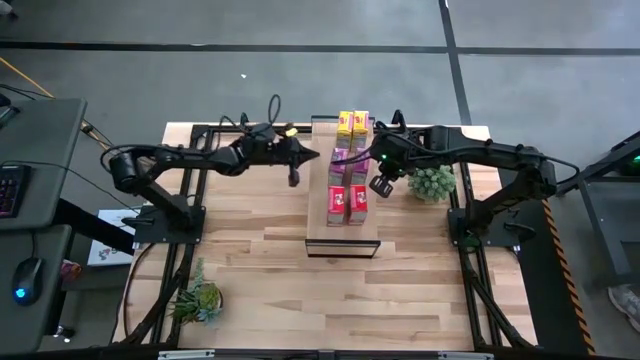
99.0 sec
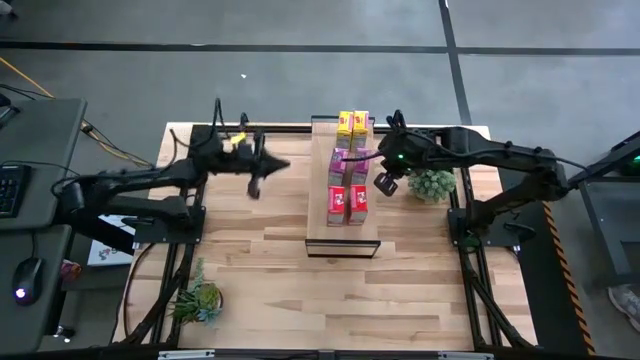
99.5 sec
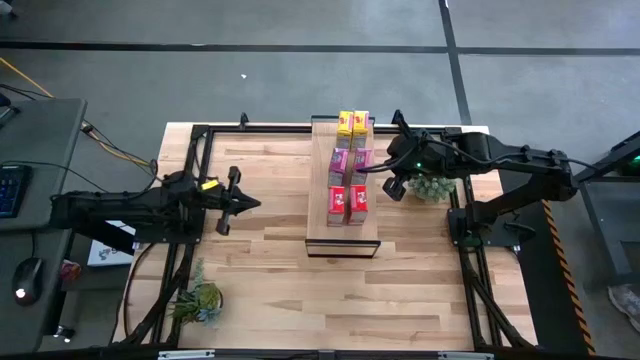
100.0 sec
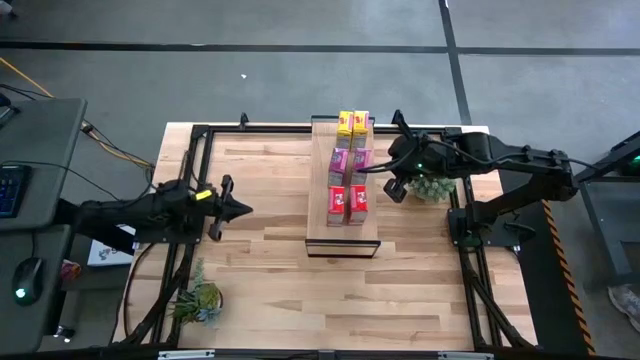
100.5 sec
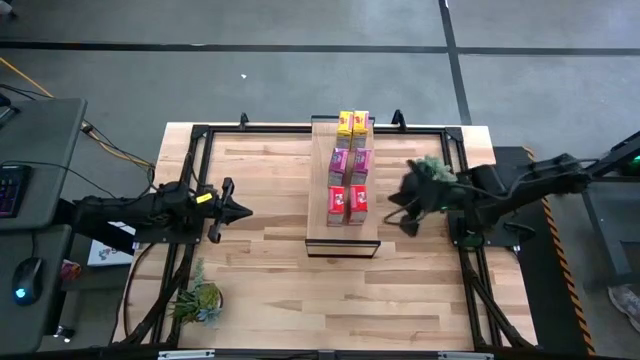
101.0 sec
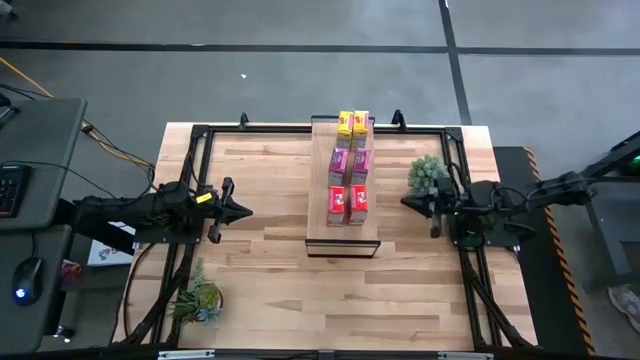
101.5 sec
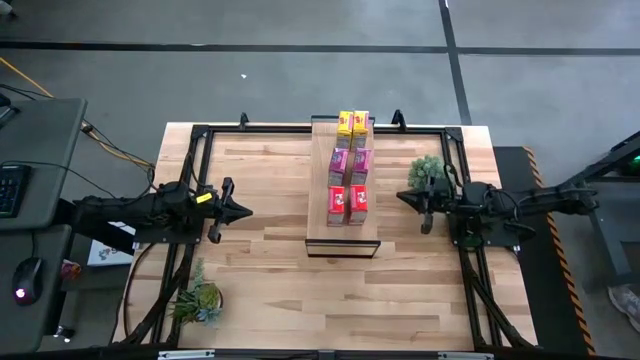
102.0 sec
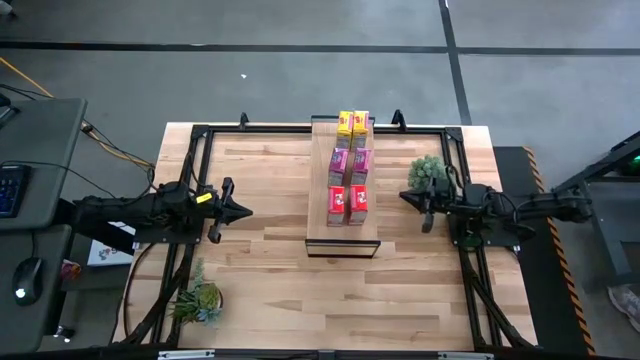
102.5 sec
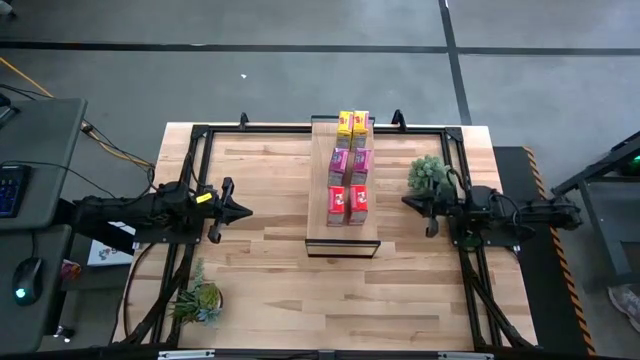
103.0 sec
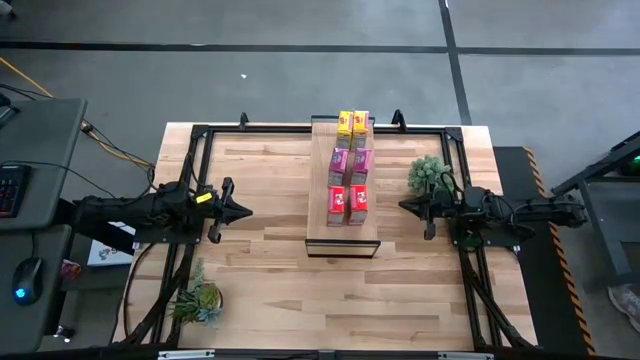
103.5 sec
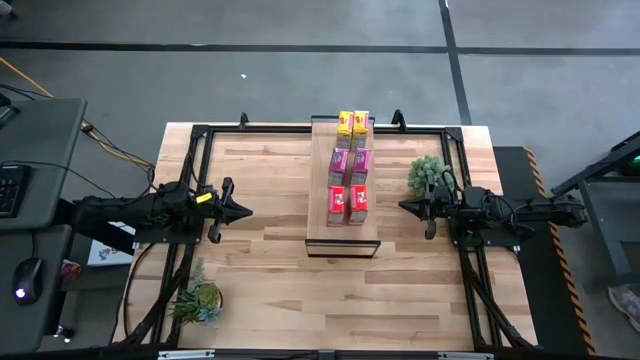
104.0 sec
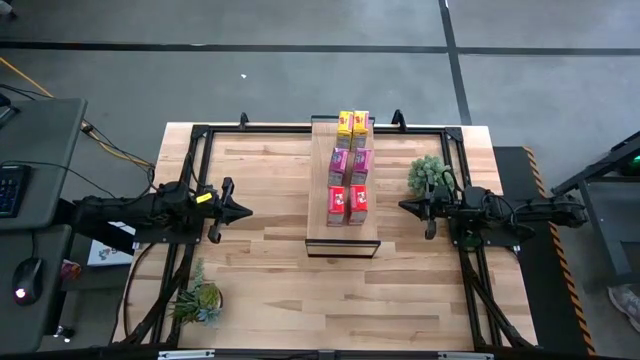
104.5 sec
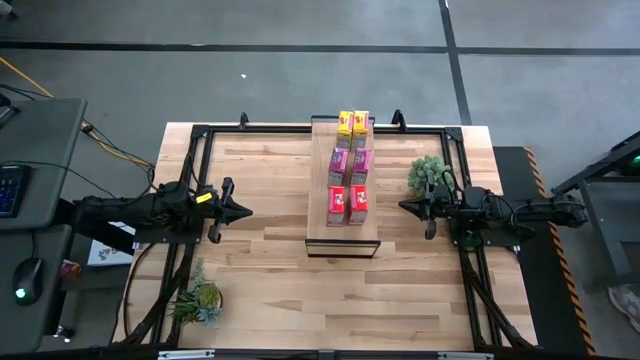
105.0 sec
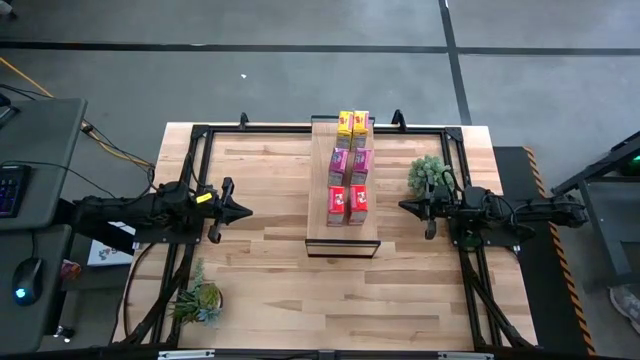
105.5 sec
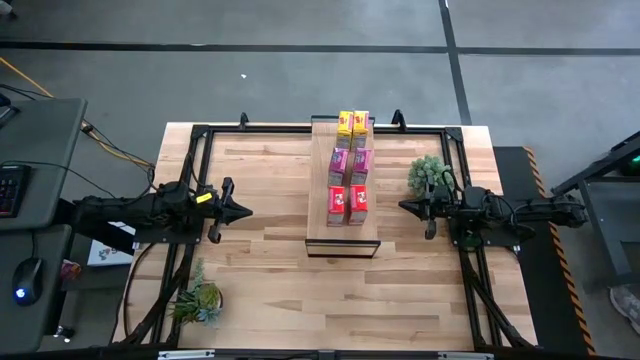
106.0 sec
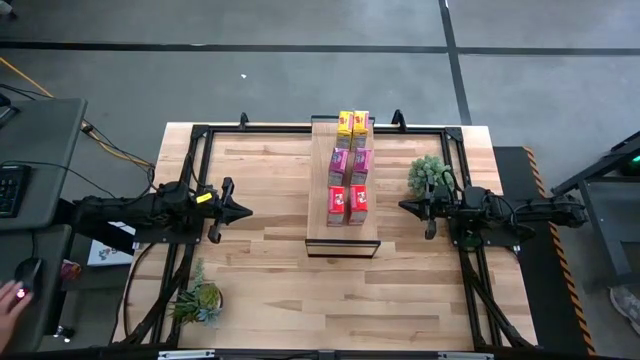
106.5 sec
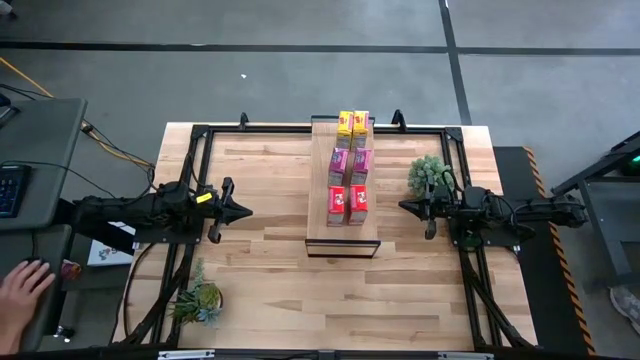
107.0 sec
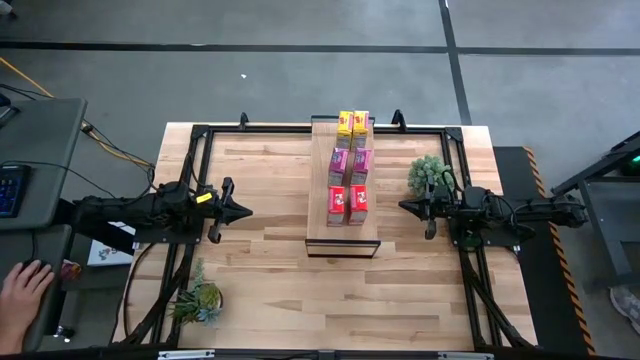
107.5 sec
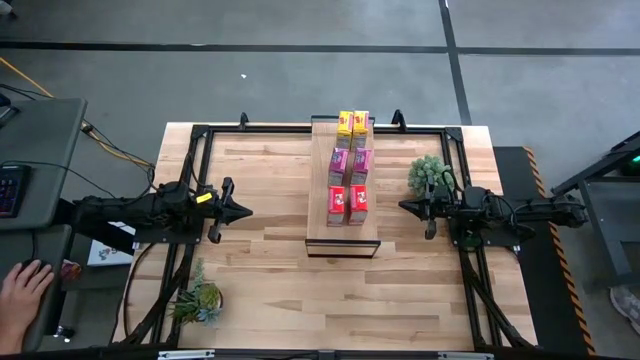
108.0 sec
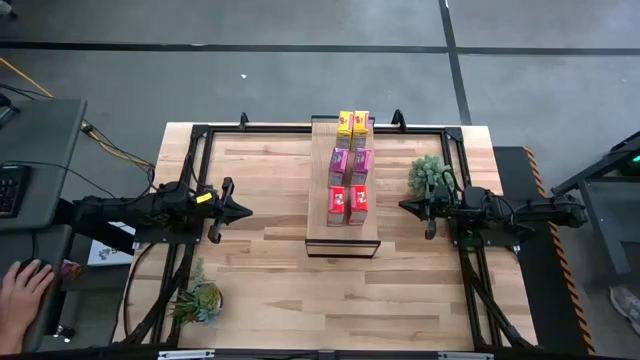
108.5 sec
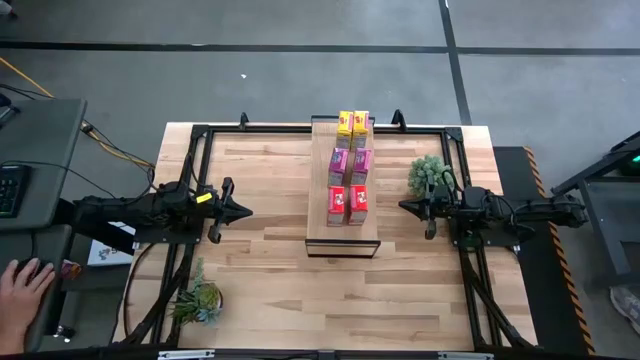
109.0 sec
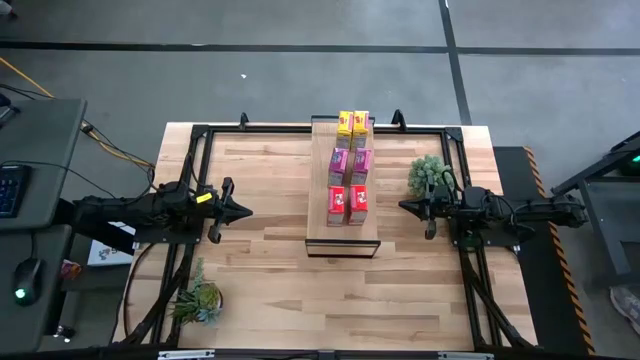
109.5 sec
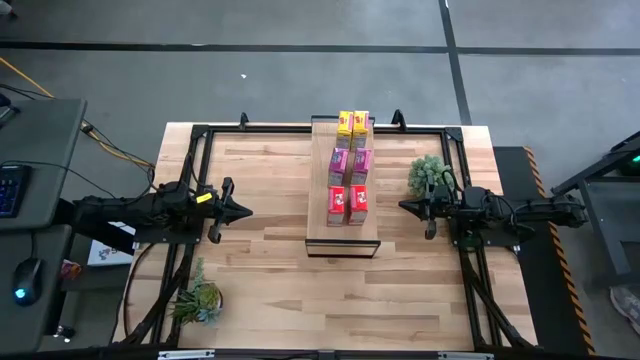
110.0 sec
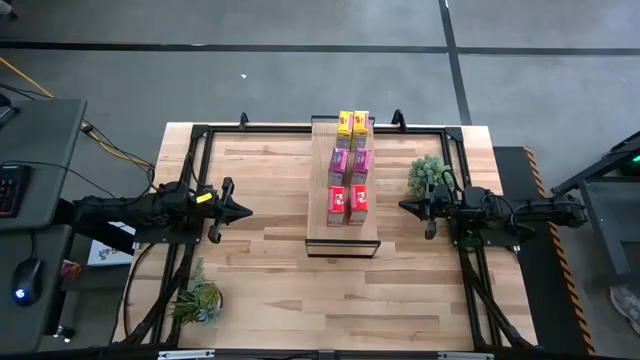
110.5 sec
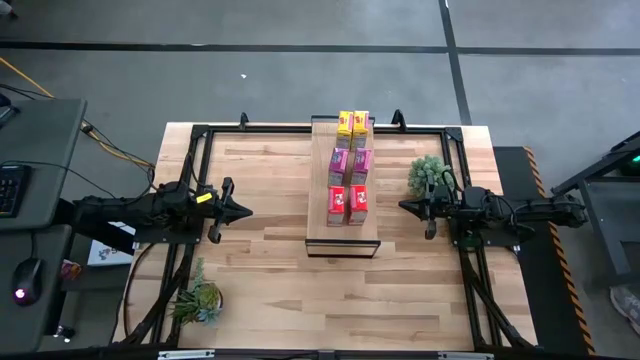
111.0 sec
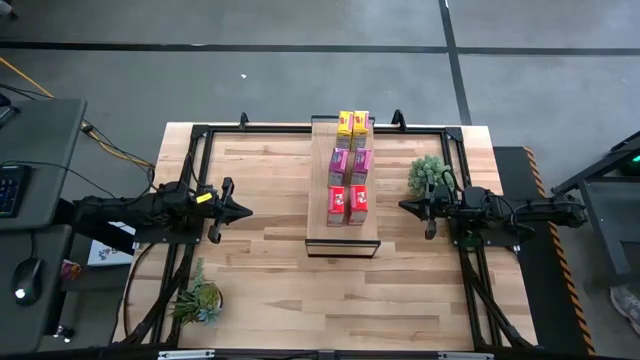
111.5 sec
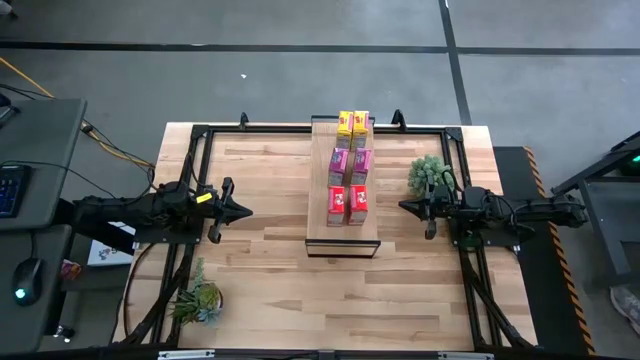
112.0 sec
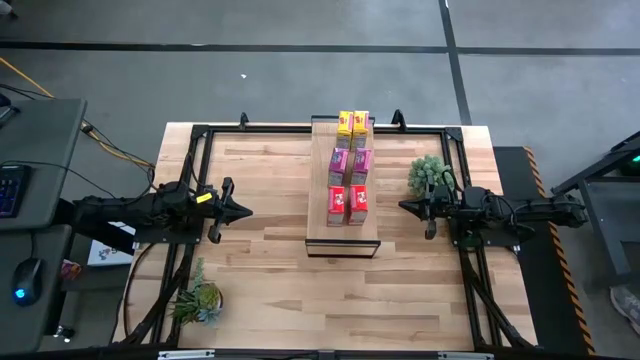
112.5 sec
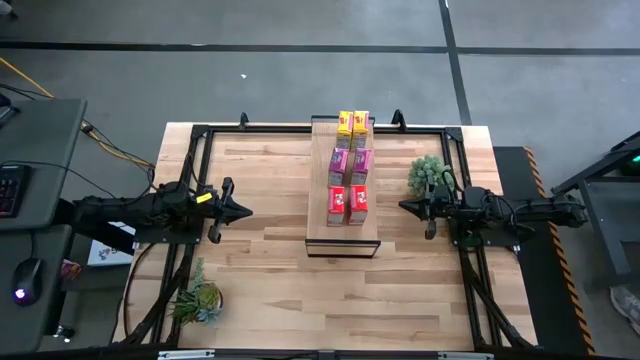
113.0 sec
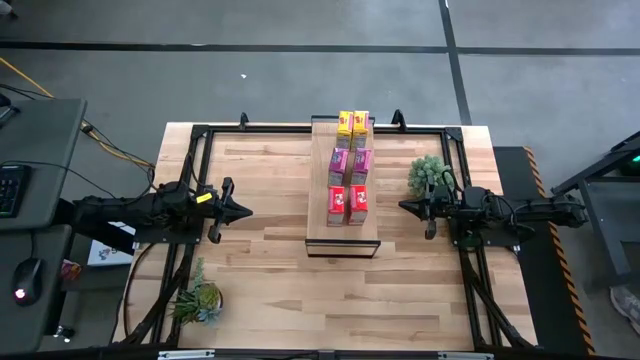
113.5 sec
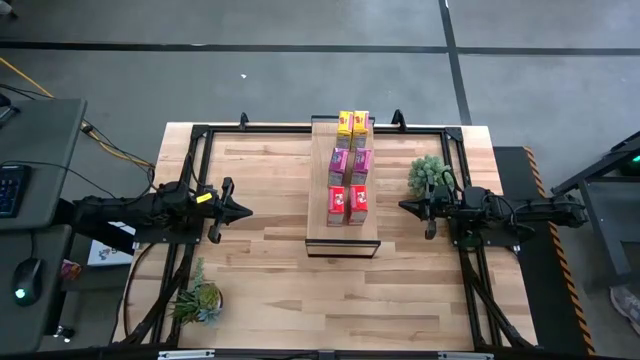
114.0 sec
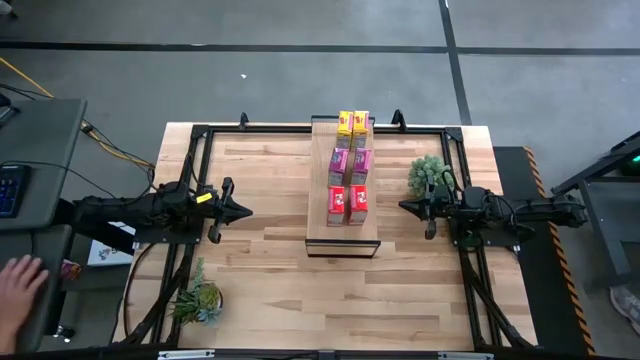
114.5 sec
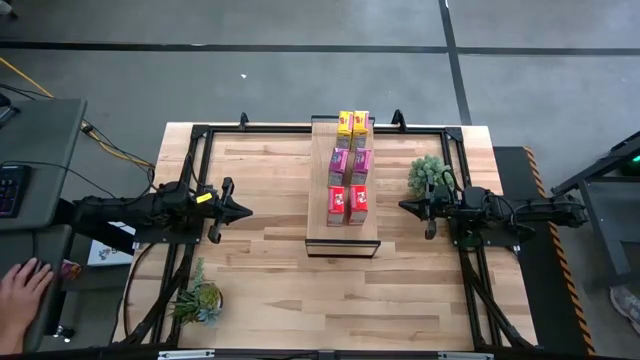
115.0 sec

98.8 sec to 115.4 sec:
Task: Stack cereal on shelf
Return to Home Position

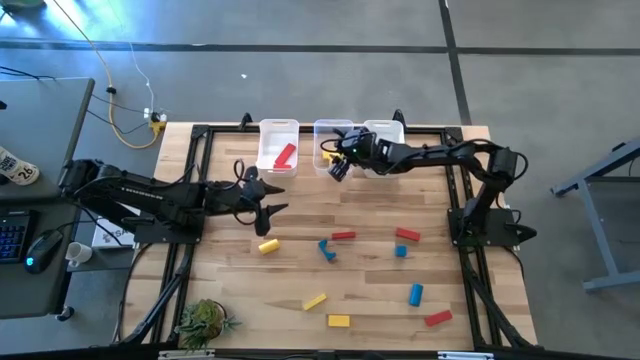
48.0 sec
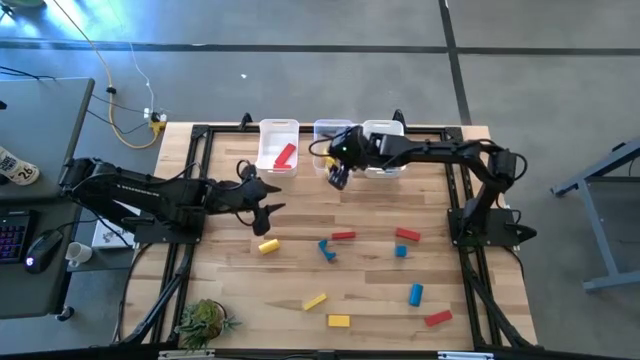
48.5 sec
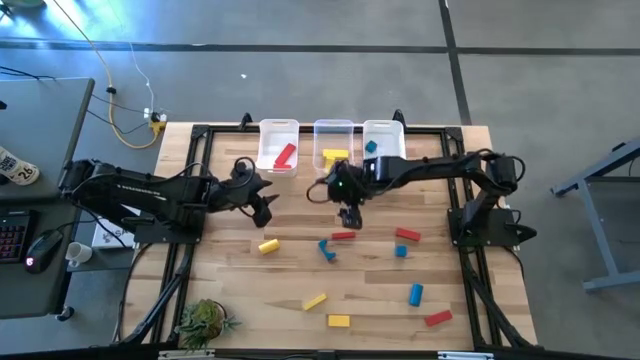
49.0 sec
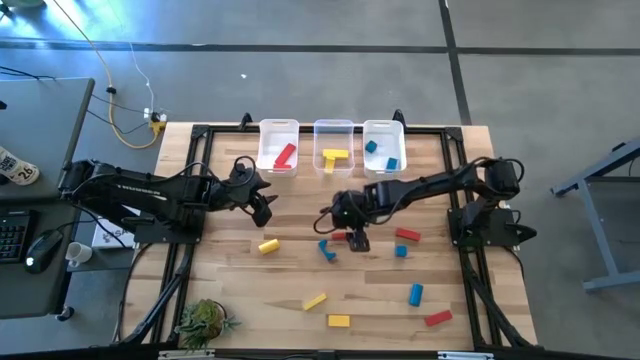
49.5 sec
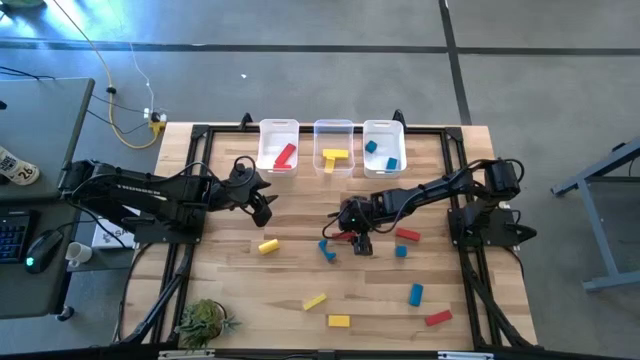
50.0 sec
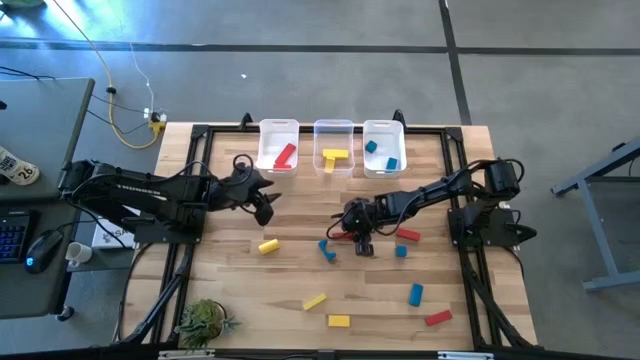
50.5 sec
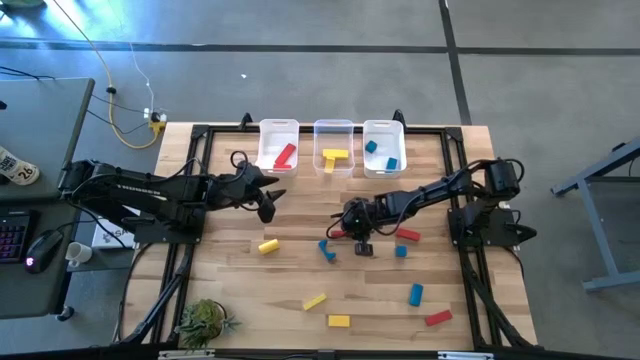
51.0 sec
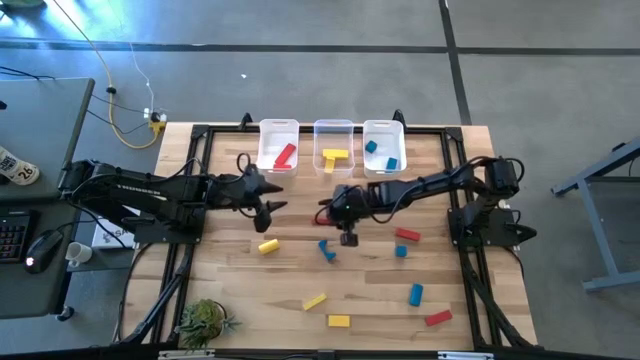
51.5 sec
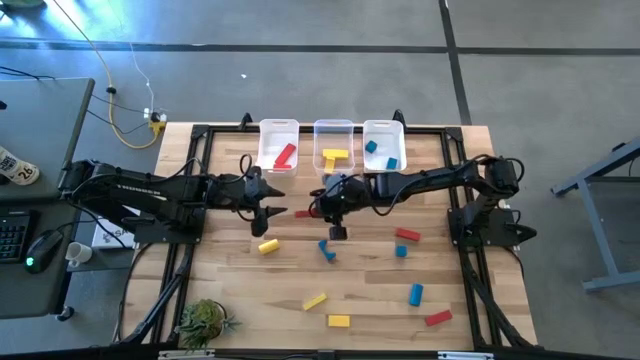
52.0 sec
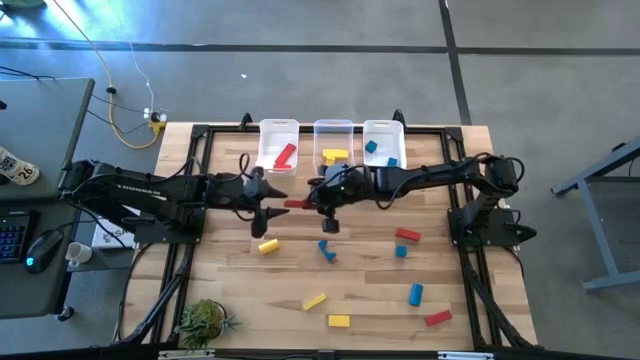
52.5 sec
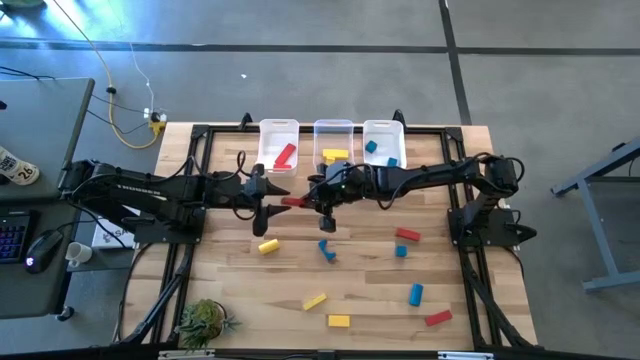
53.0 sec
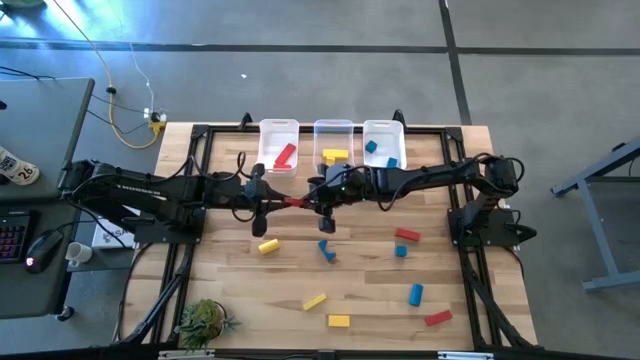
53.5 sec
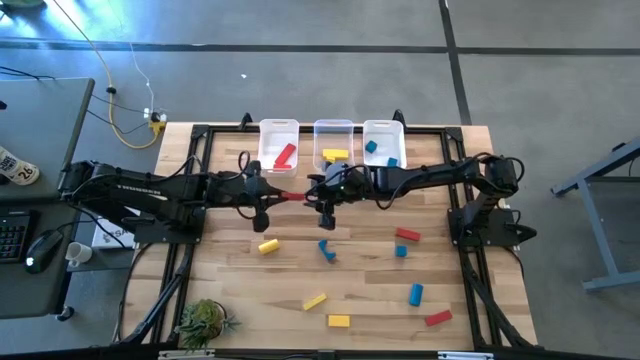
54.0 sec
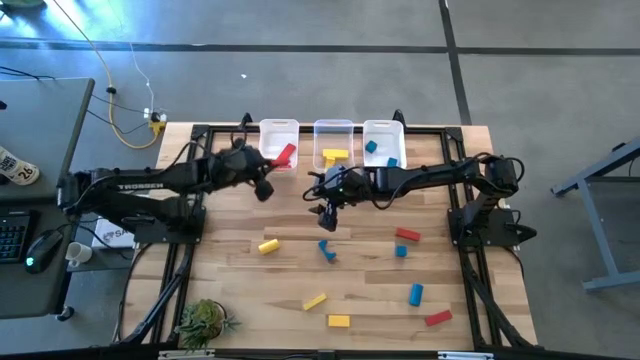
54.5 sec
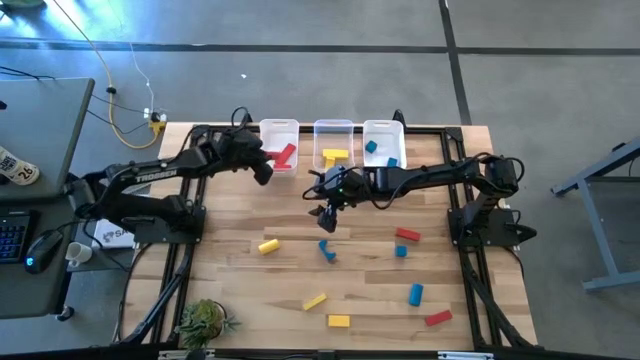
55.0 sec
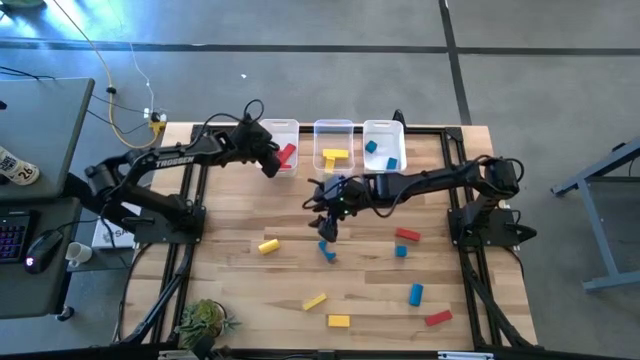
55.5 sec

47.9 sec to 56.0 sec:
Task: Sort & place blocks by color
Put the red block into the left white bin
